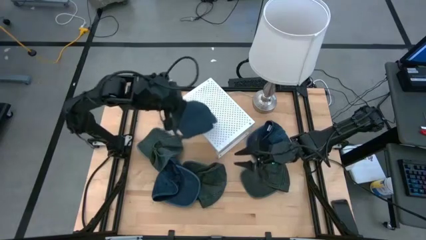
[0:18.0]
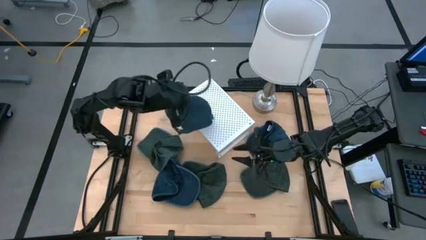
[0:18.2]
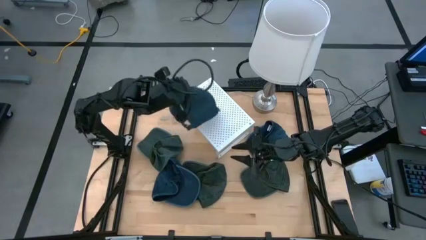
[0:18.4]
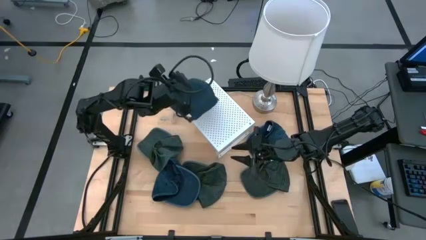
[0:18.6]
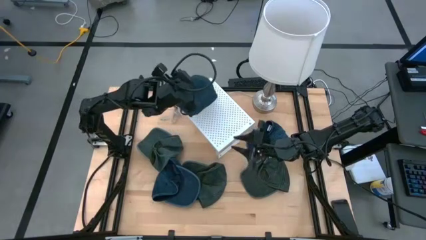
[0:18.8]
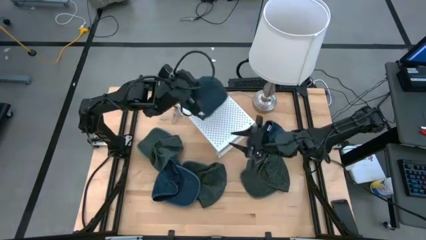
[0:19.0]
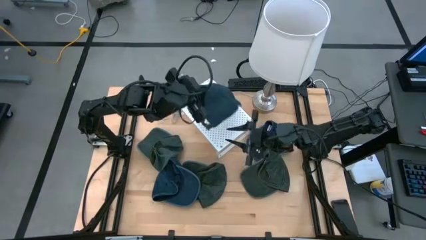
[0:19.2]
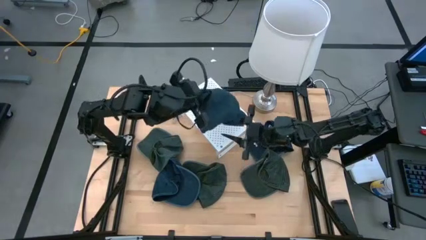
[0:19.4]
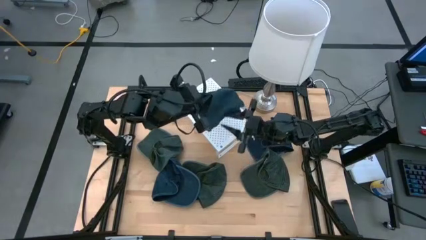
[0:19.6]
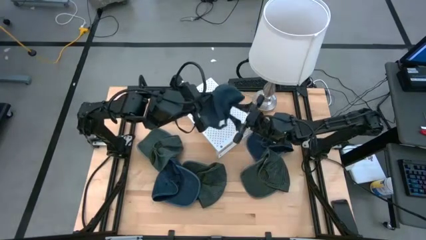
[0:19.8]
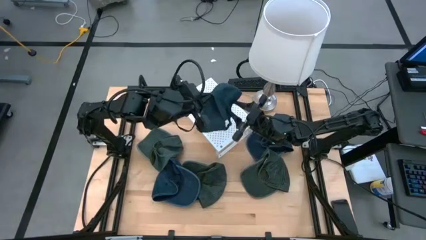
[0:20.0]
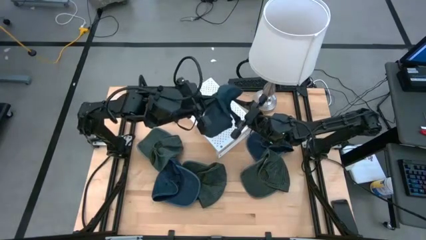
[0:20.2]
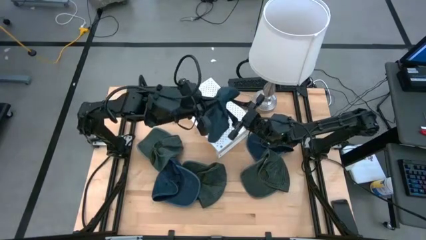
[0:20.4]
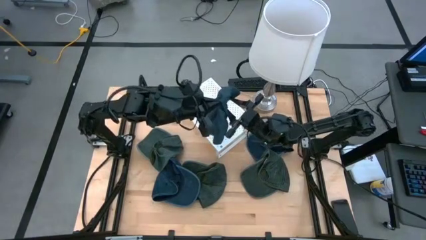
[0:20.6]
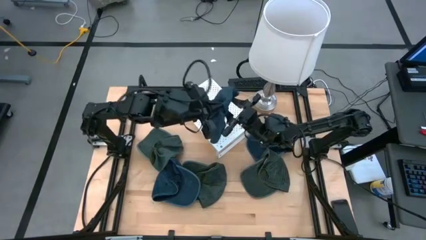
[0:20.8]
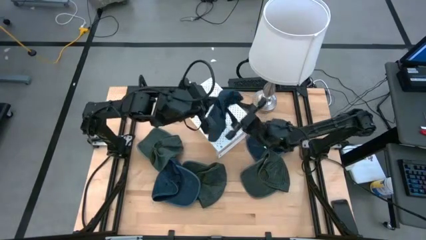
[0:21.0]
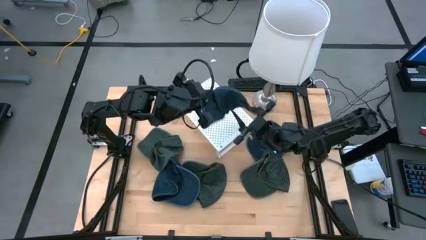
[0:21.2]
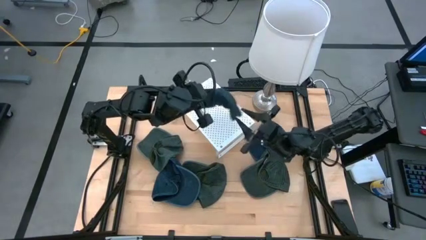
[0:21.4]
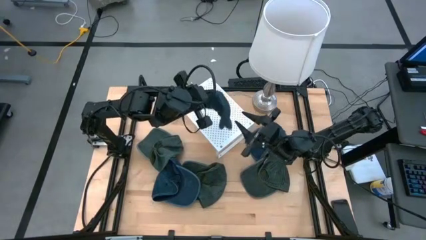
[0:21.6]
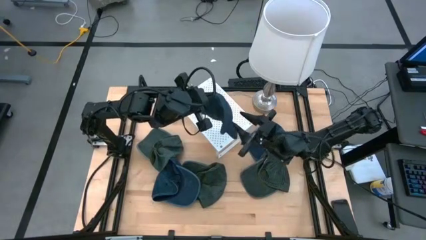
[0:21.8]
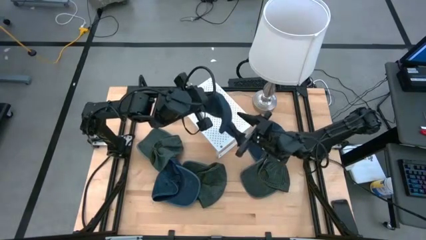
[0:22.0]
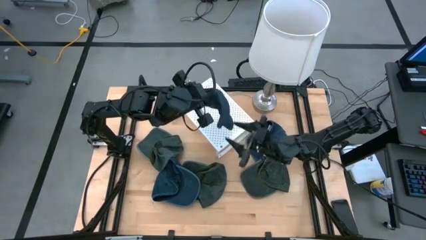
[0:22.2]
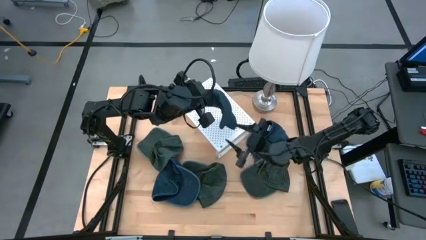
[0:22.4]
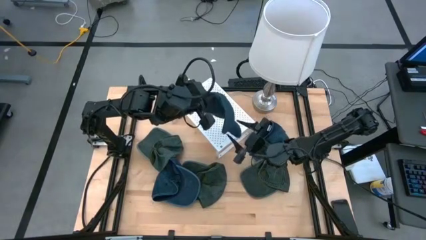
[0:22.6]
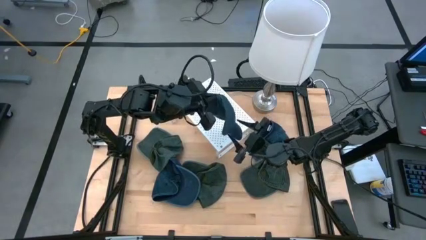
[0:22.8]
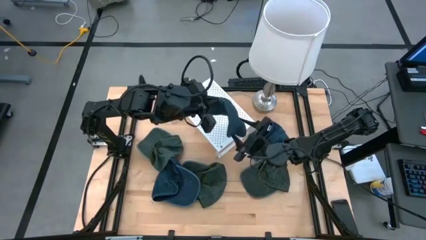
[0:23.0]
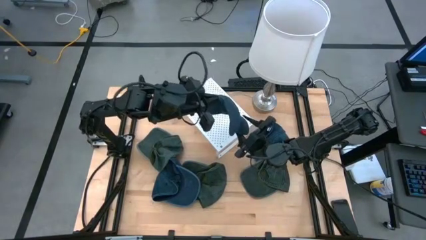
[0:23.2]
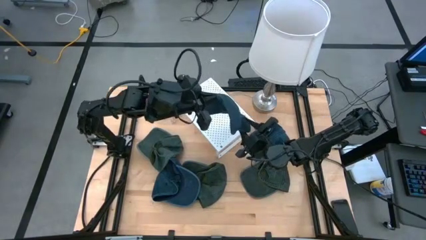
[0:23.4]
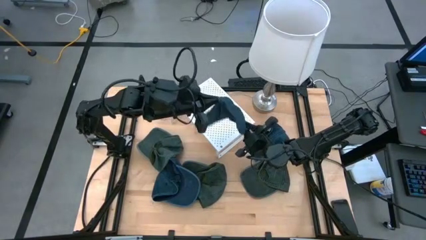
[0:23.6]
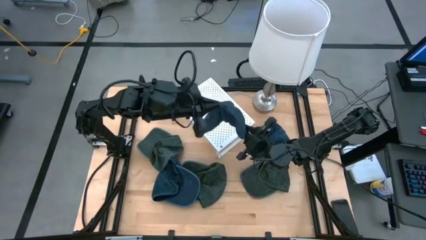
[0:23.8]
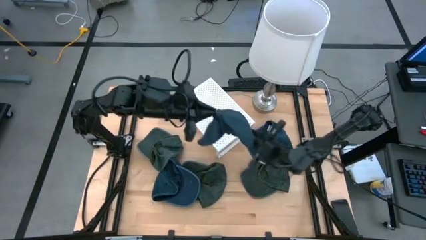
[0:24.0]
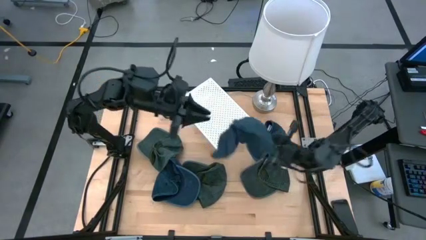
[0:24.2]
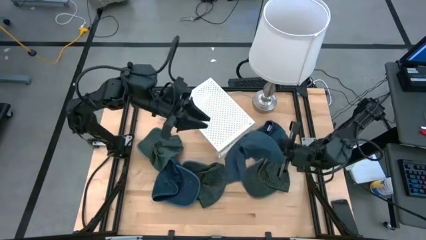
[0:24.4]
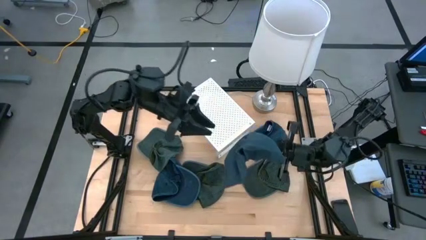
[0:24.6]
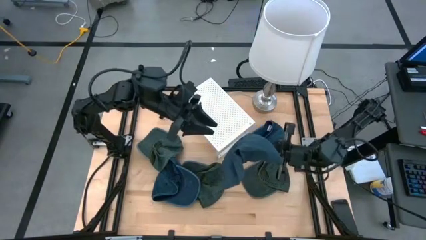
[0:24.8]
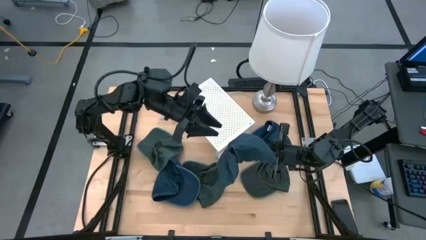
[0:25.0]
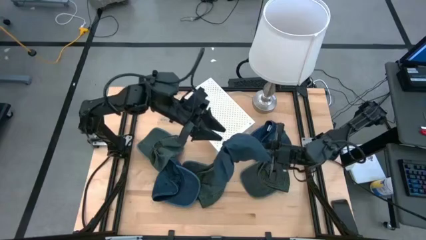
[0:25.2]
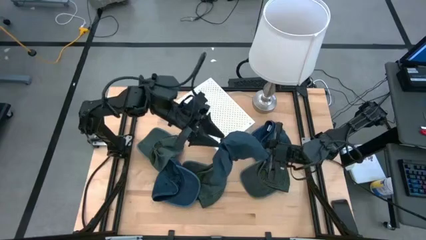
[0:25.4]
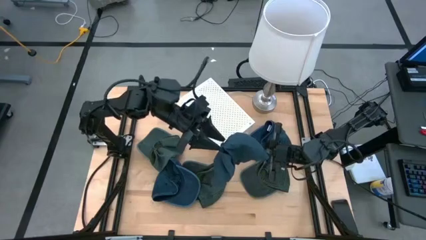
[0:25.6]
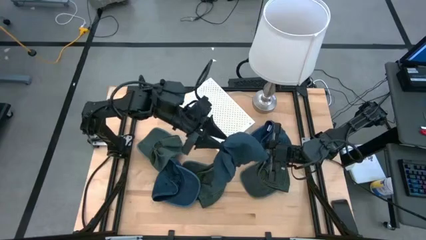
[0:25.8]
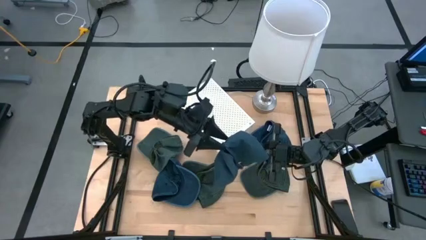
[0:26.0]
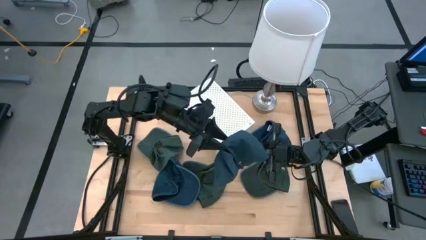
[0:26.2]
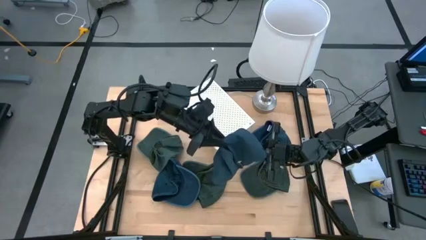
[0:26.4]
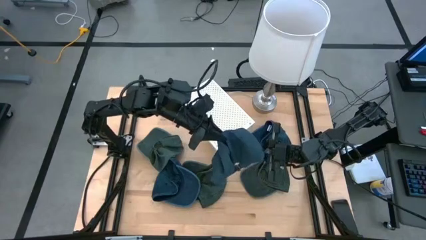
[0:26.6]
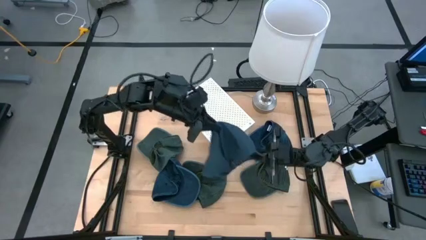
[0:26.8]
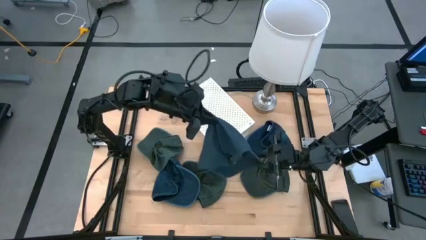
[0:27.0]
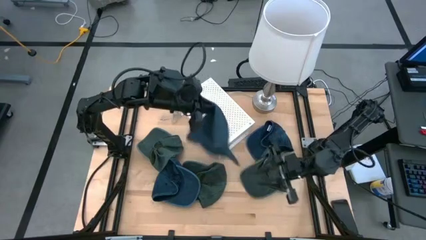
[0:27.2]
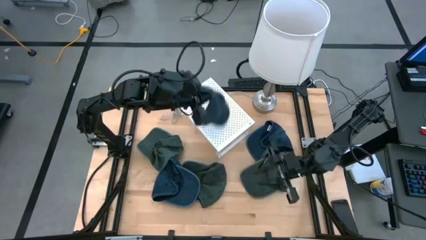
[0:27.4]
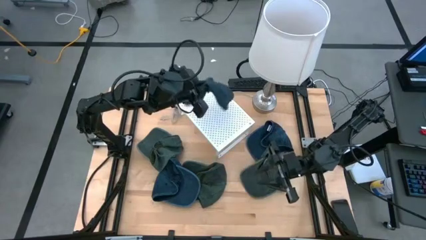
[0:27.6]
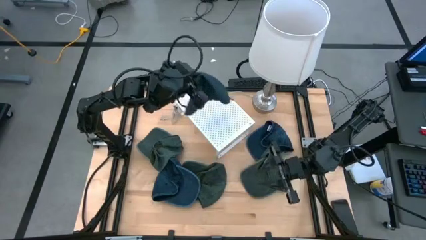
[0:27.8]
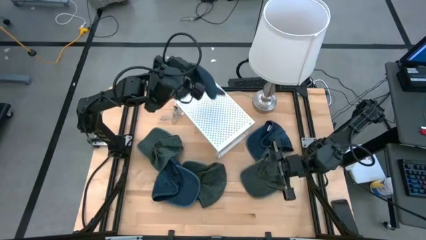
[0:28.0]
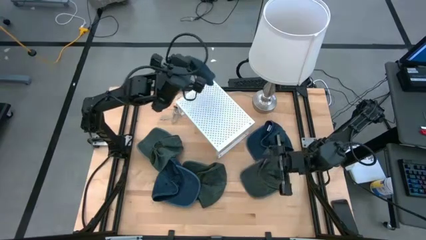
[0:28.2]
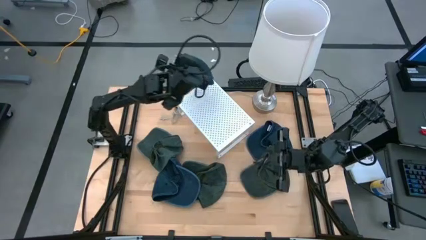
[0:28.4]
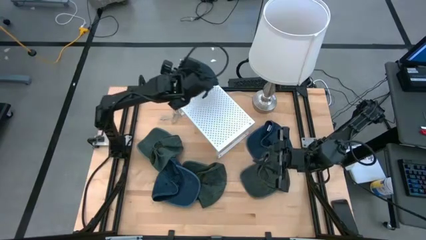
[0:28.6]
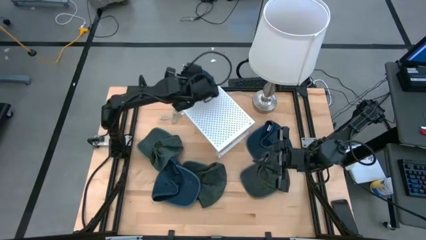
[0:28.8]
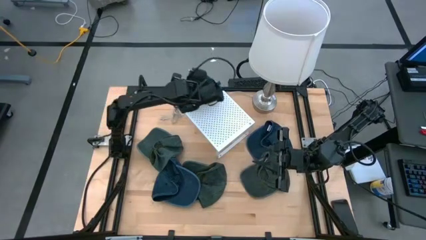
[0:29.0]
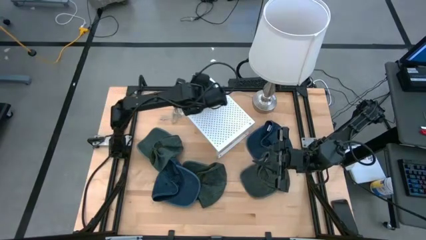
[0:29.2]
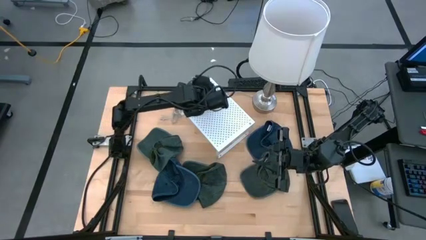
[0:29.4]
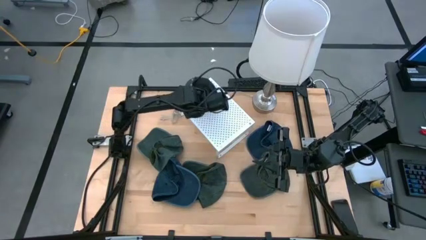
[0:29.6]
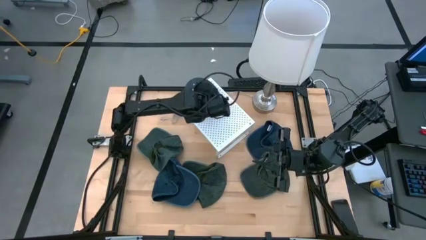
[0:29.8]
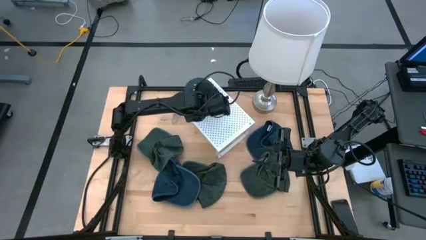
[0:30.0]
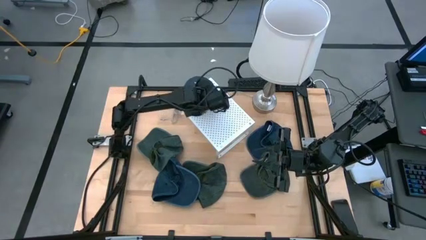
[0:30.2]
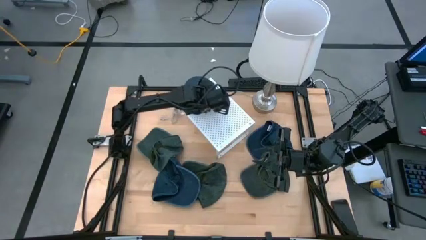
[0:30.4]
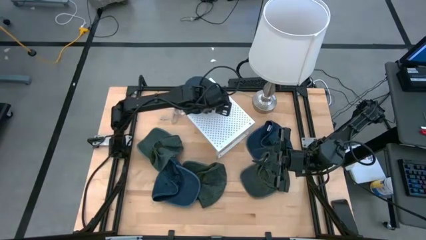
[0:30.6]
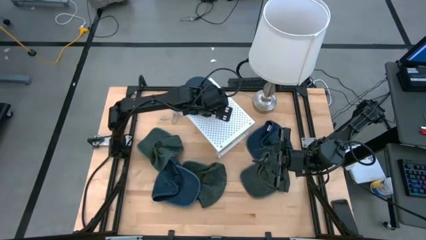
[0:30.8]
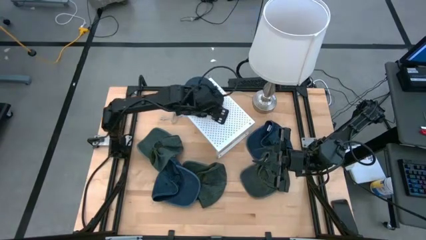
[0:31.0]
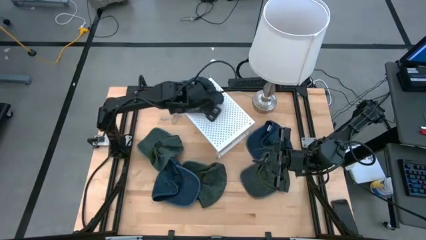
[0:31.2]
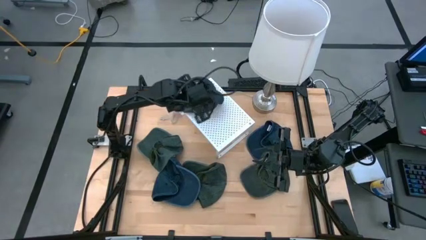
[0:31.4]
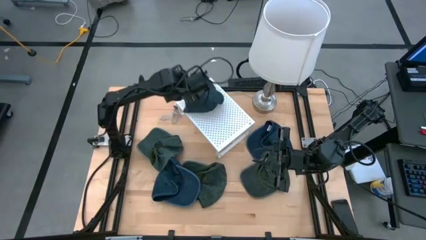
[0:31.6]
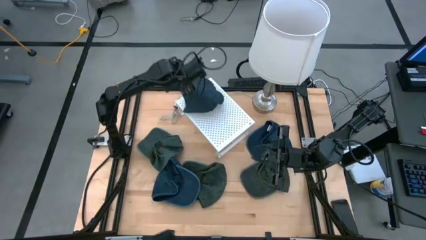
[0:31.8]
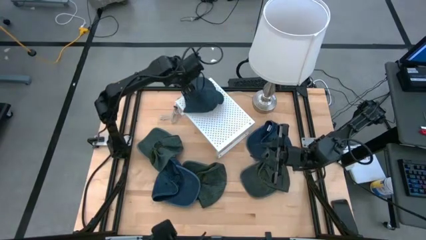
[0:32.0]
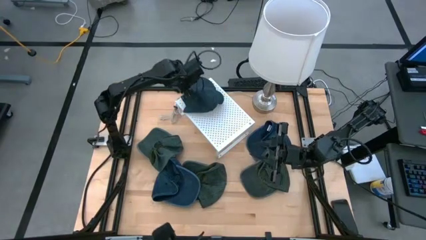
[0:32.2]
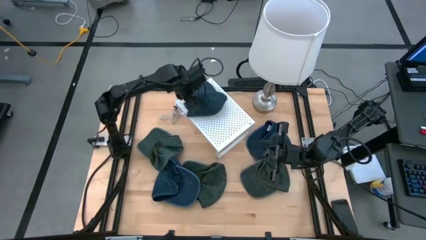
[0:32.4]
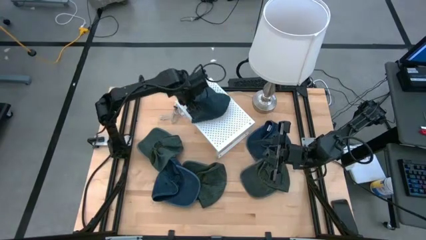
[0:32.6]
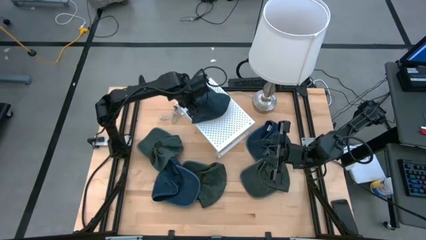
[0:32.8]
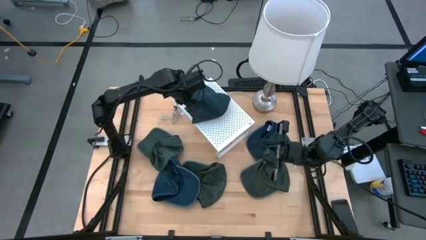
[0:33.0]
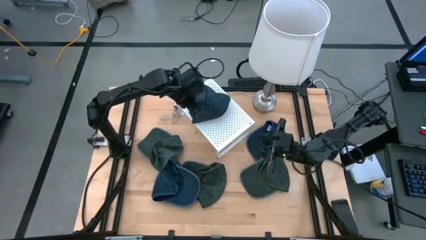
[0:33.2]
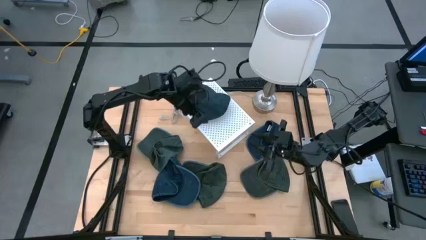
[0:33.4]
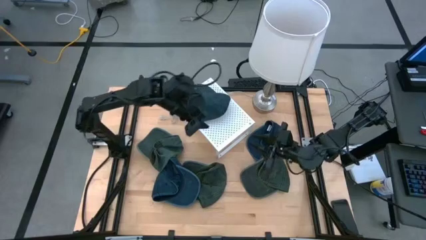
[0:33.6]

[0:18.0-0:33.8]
Task: Pick & Place hat
Put the bottom right blue cap on the shelf

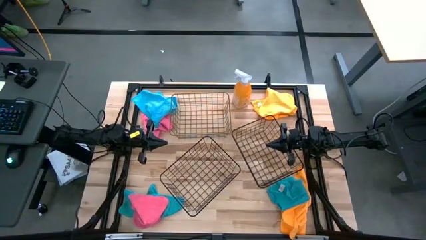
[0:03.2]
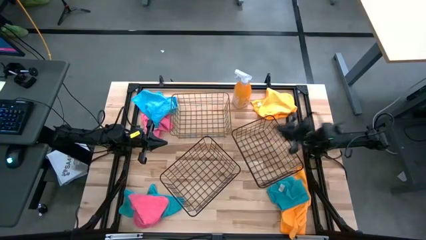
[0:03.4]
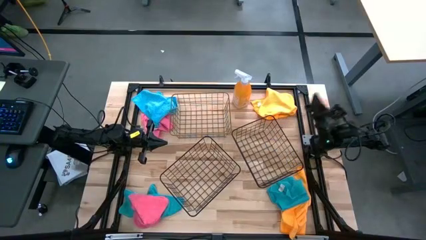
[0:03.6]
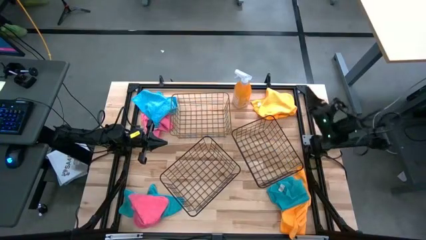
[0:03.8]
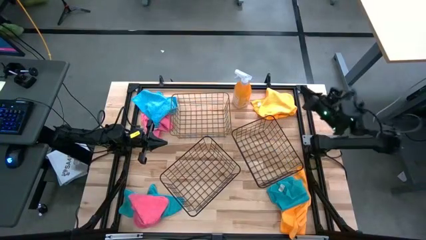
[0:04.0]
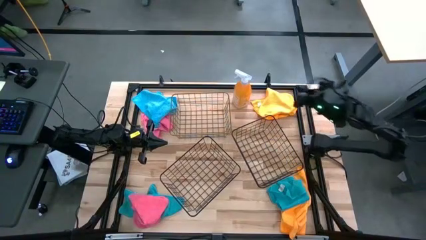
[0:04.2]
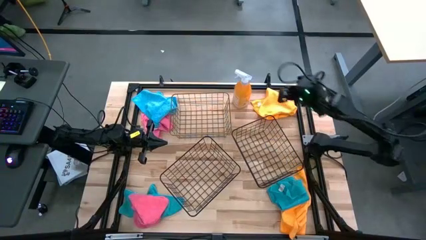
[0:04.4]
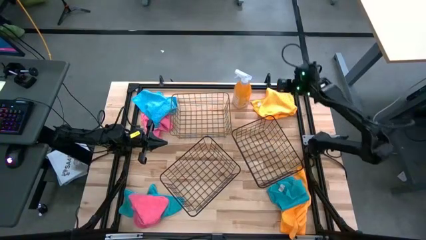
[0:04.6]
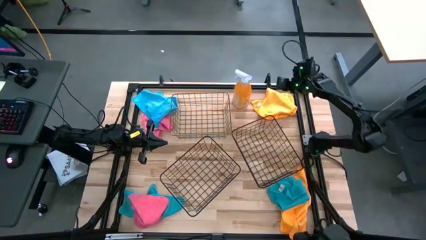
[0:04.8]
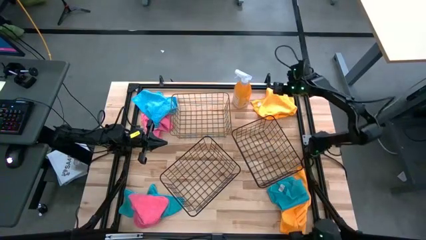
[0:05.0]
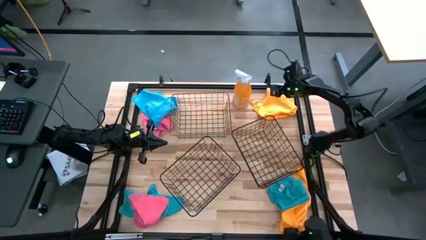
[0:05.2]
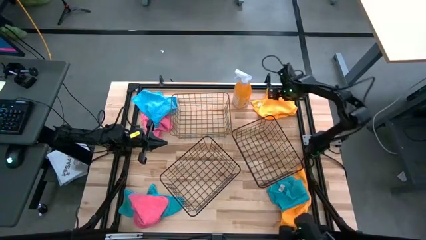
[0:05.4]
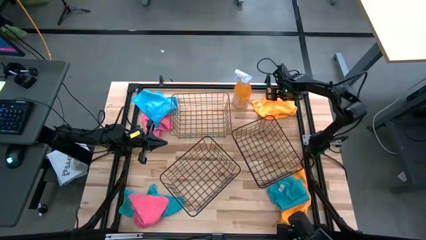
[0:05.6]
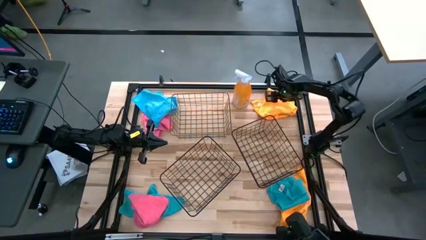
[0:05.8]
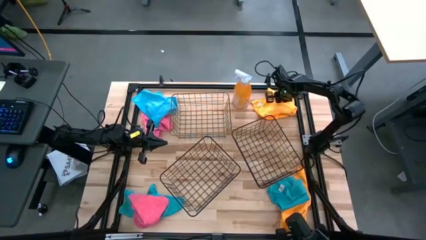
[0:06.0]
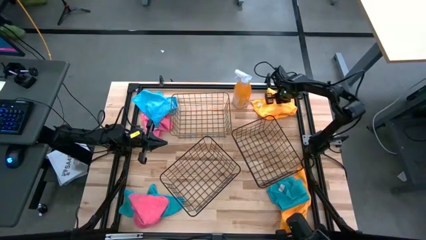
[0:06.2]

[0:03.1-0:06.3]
Task: Sort microfiber towel by color & place in baskets
Put the top yellow microfiber cloth into the gold basket
